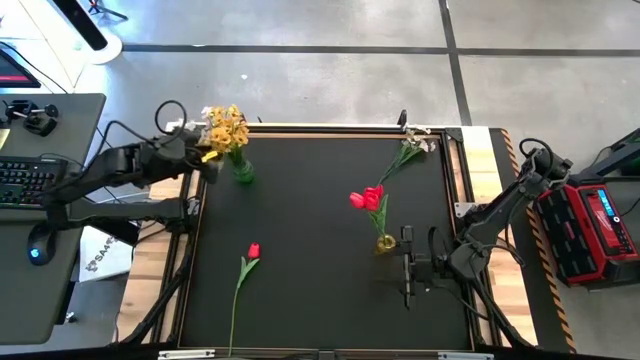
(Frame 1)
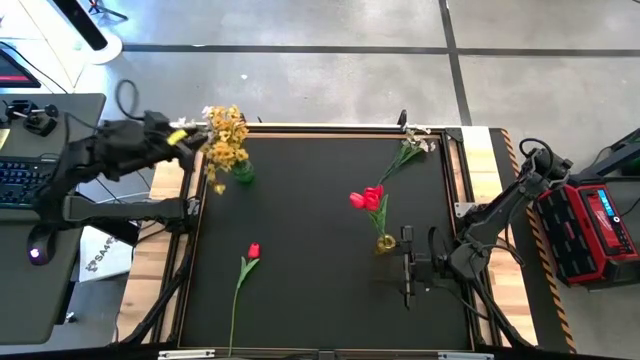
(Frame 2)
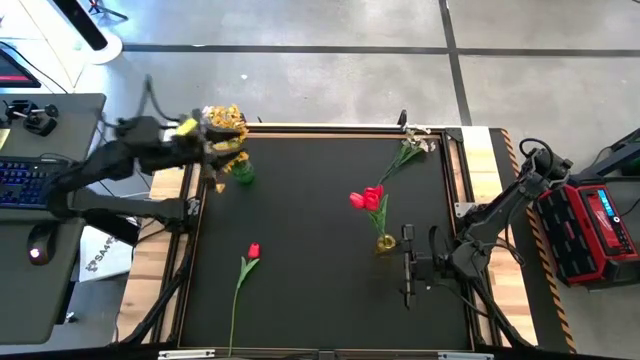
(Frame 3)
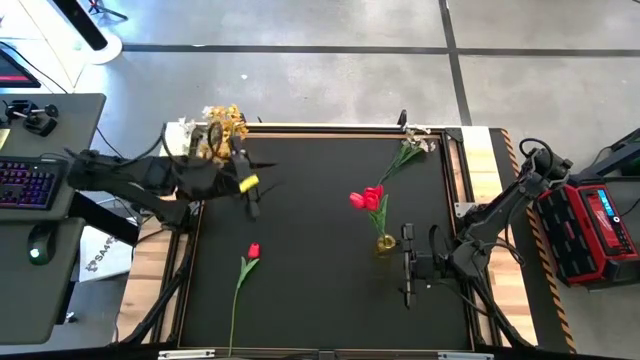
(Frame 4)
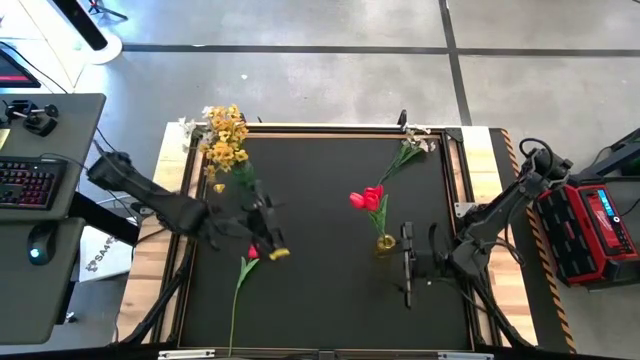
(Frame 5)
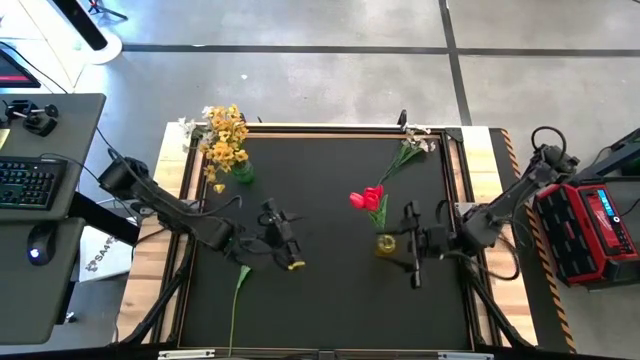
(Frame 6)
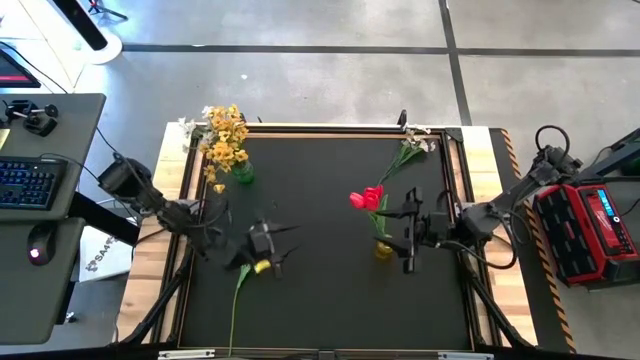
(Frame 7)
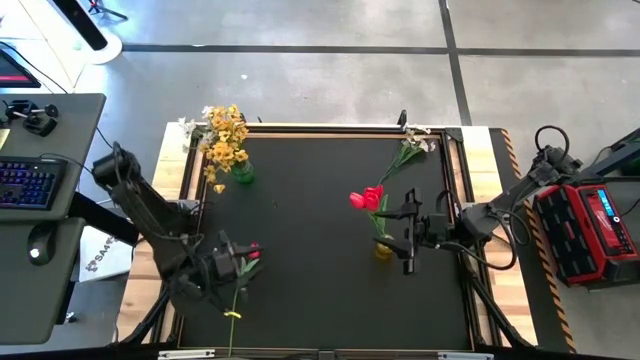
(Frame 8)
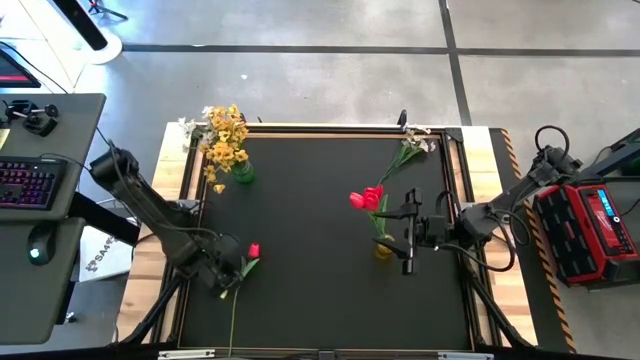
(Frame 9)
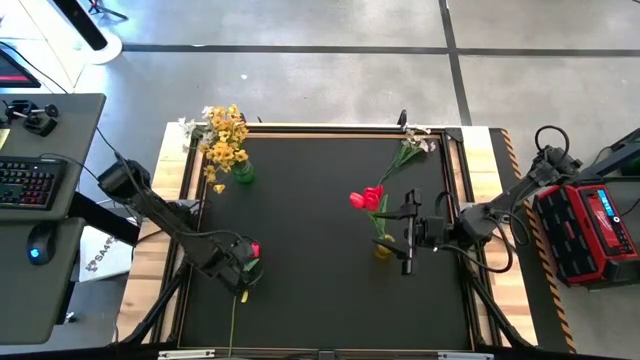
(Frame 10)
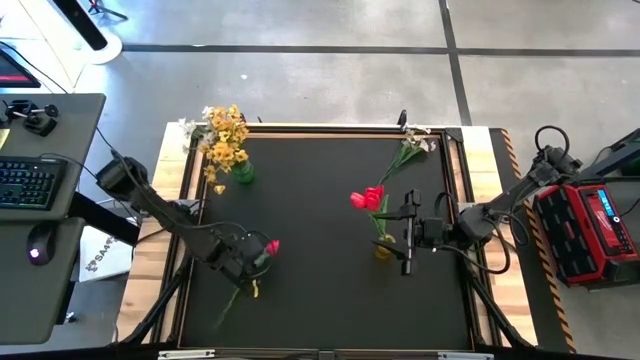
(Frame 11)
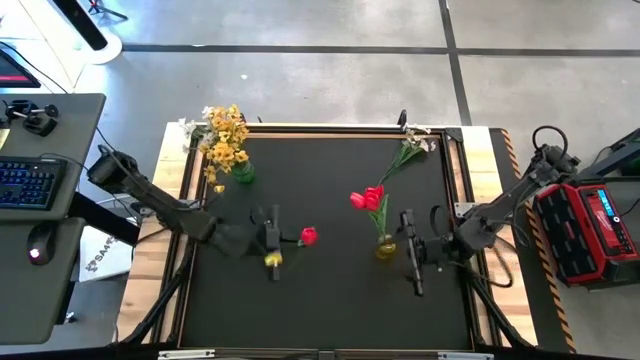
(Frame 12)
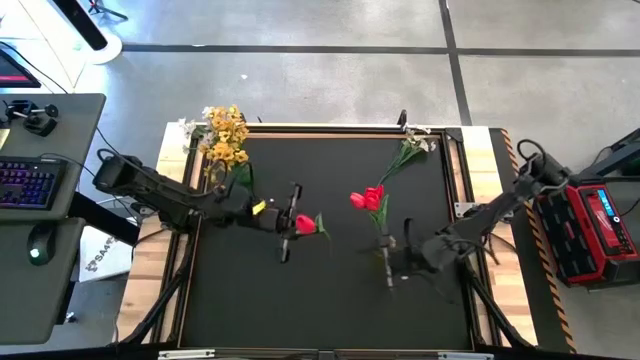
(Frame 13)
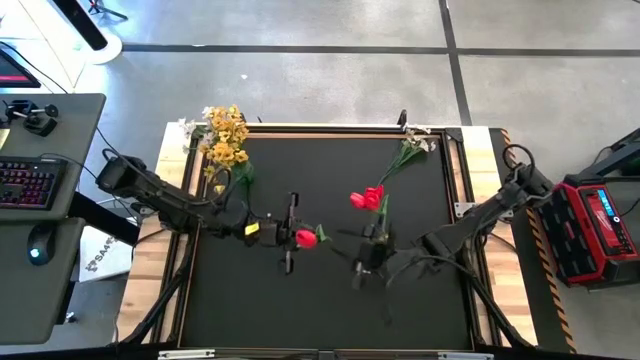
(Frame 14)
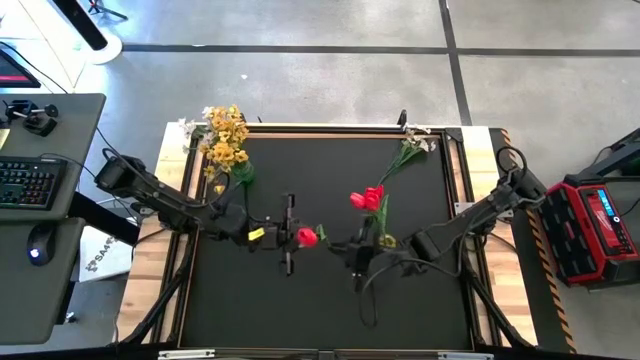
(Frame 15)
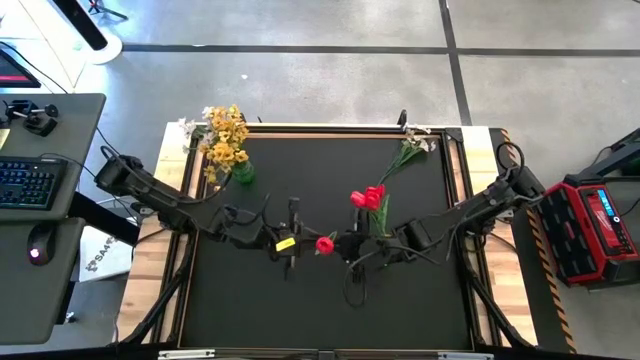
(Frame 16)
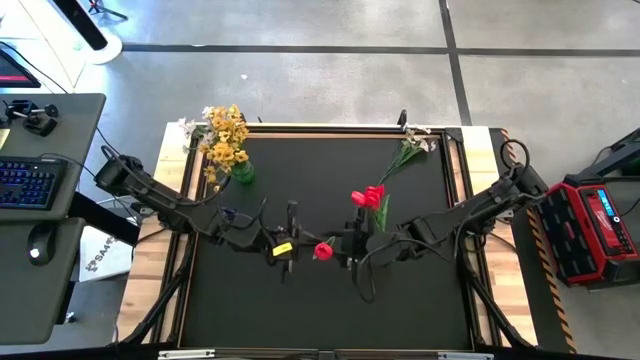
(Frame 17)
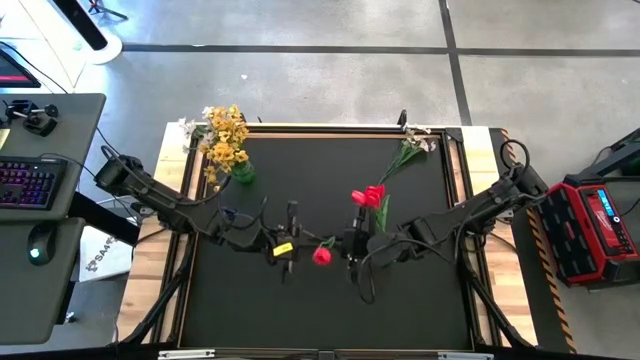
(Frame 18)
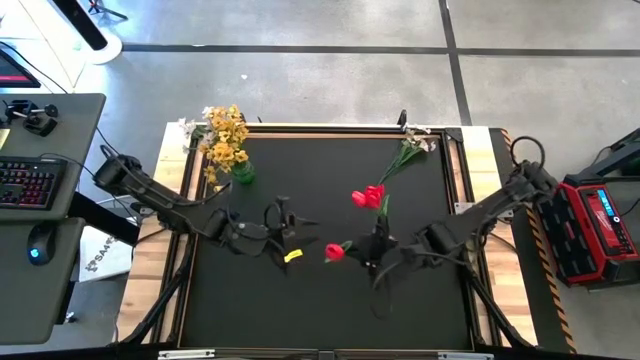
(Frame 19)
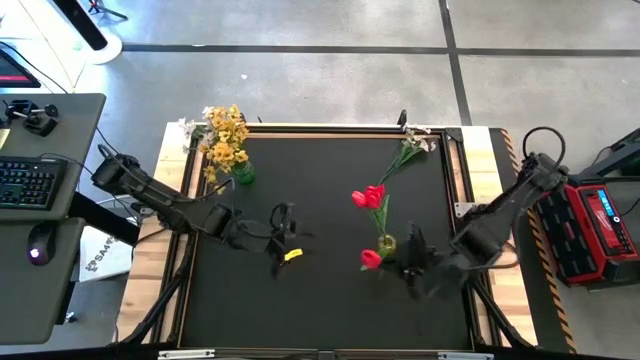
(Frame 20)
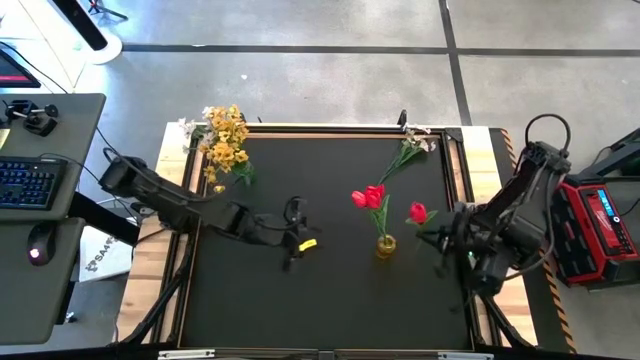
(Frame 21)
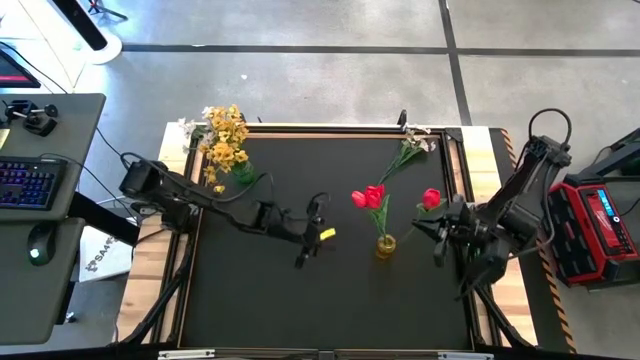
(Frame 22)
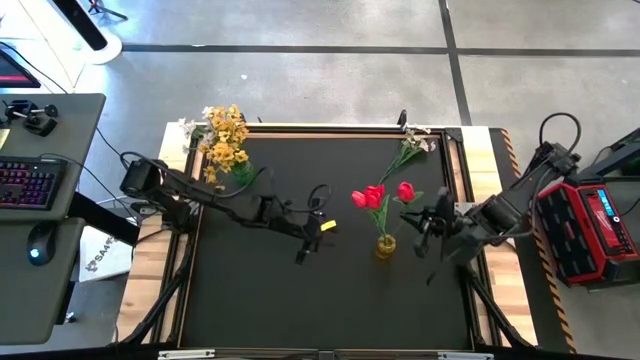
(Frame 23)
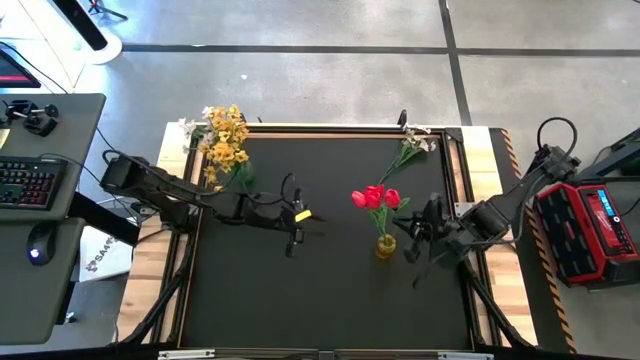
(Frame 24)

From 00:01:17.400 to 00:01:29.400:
Task: Sort flowers into vase by color
Put the red flower into the yellow flower vase

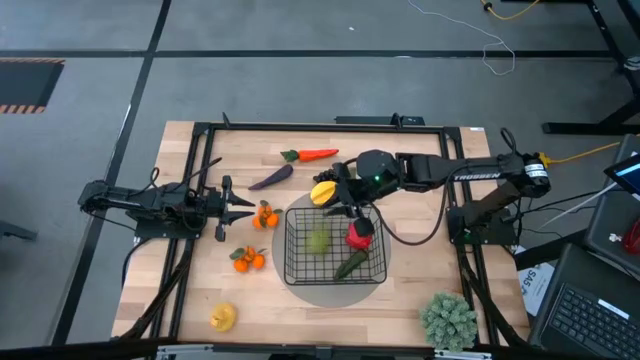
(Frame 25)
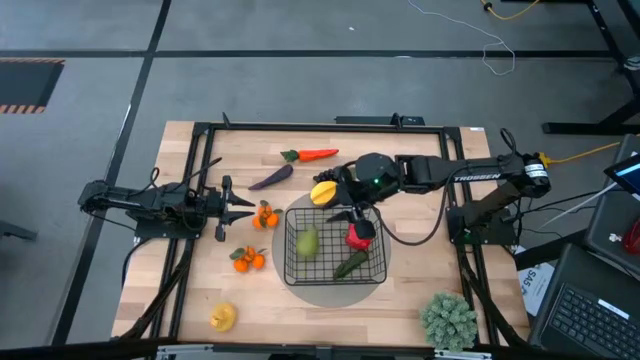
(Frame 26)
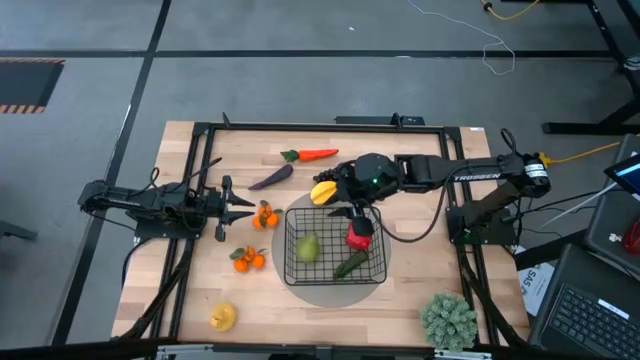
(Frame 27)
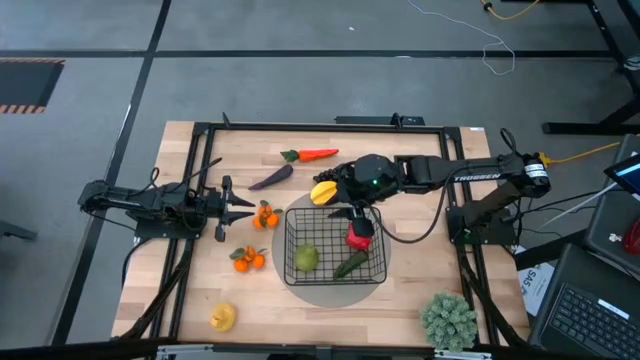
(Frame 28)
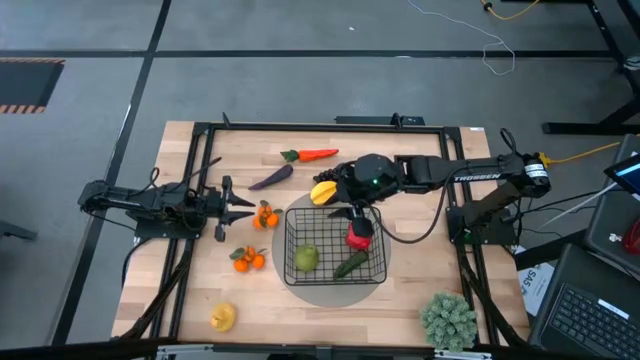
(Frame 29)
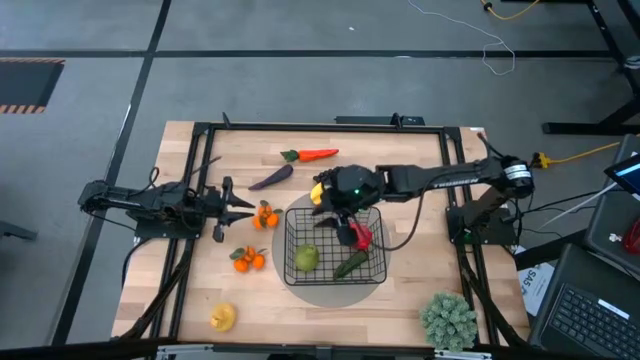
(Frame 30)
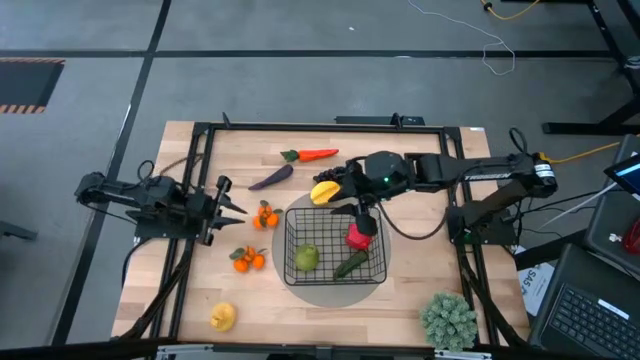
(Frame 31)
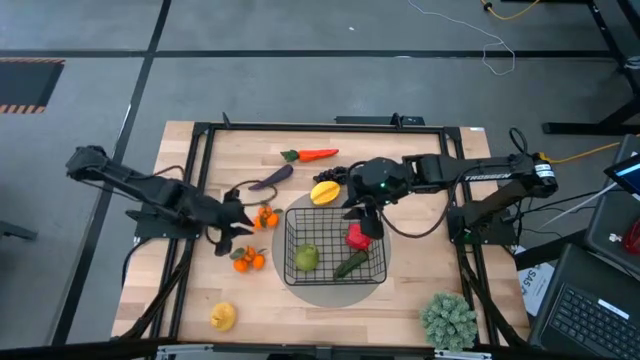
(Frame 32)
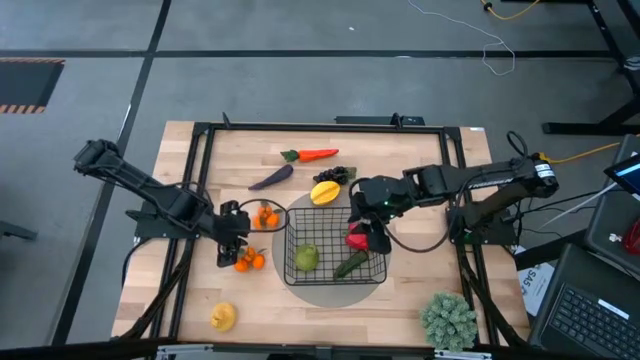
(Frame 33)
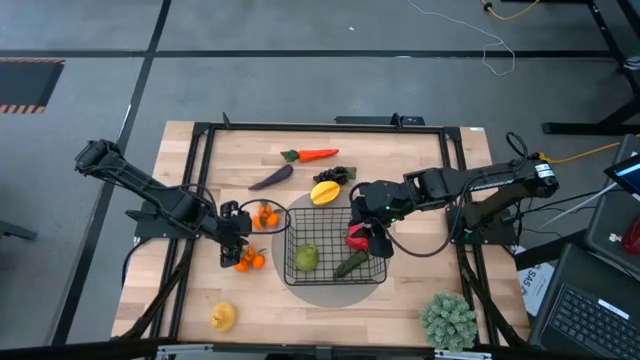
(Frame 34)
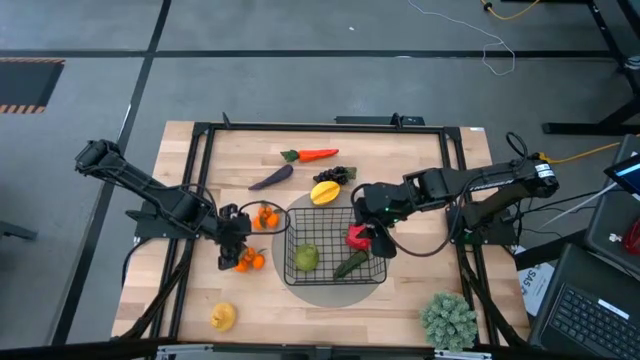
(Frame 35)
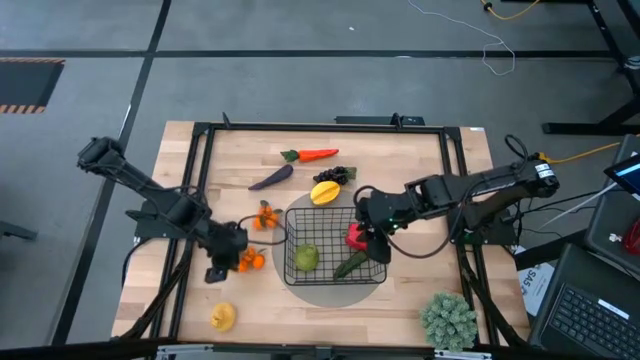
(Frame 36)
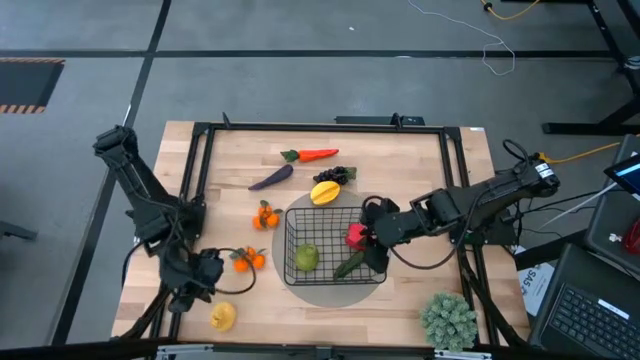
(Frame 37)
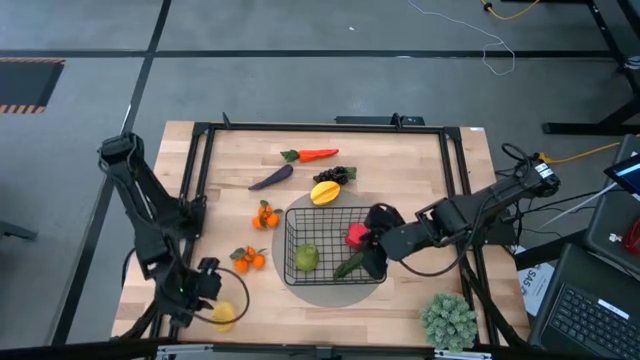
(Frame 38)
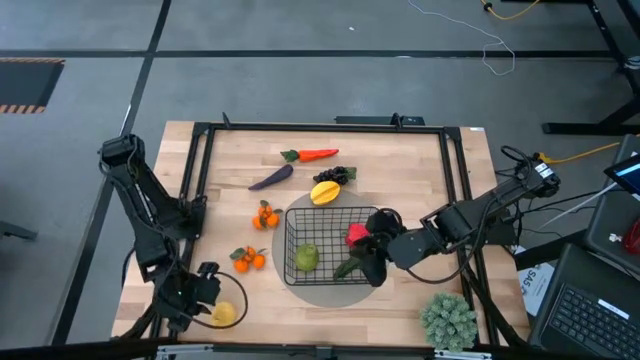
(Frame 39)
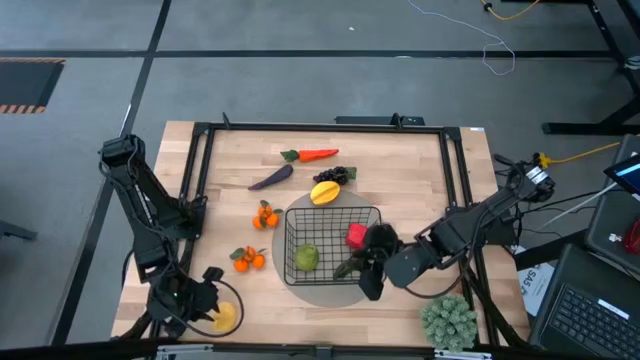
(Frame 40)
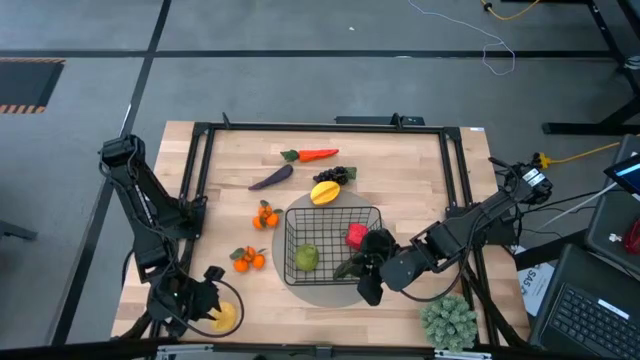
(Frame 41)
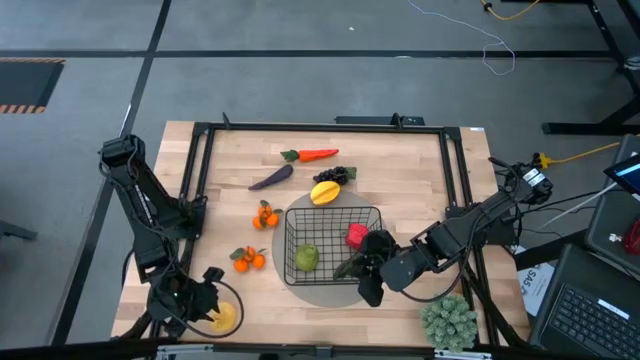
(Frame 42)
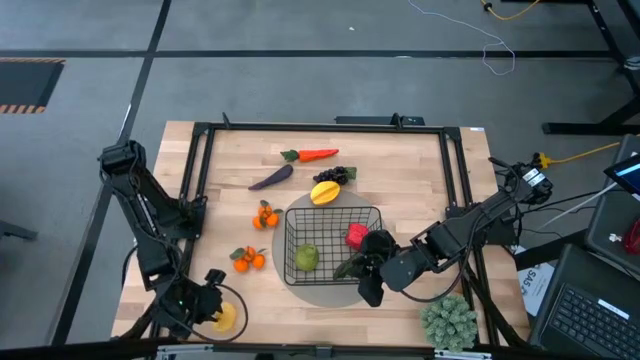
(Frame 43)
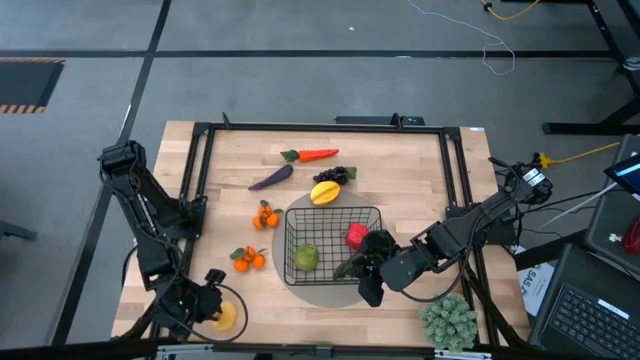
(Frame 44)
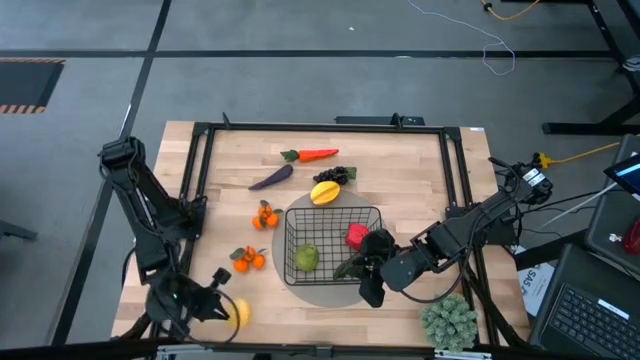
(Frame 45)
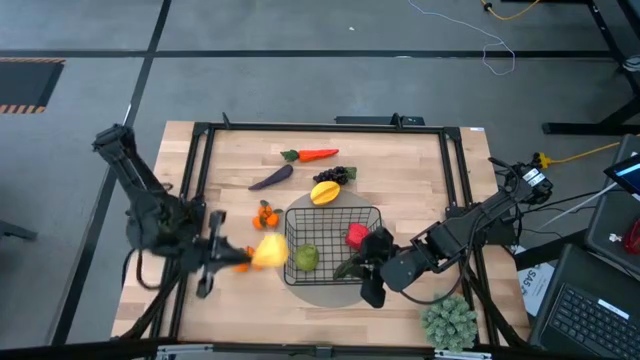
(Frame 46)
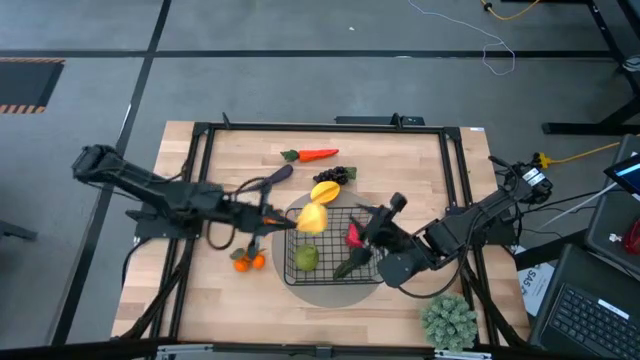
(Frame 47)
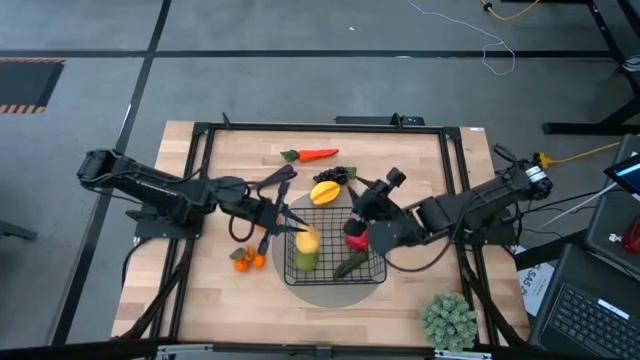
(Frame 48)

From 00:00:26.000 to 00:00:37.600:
Task: Build produce basket
Put the yellow pear into the black wire basket
